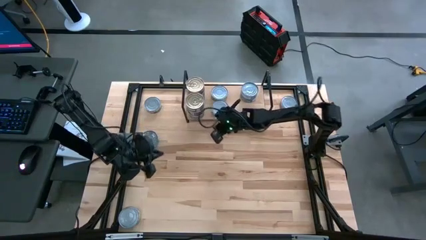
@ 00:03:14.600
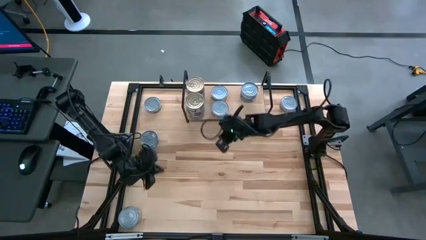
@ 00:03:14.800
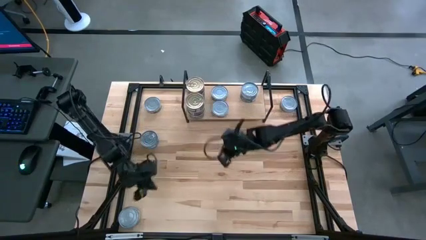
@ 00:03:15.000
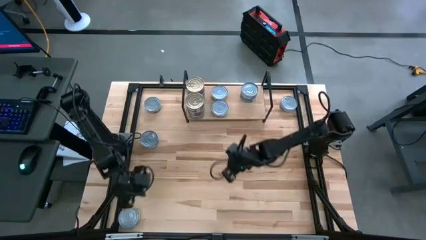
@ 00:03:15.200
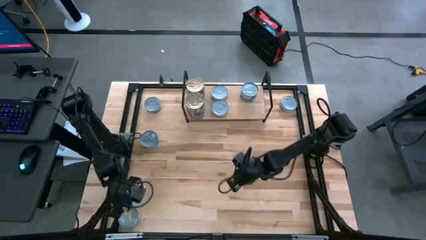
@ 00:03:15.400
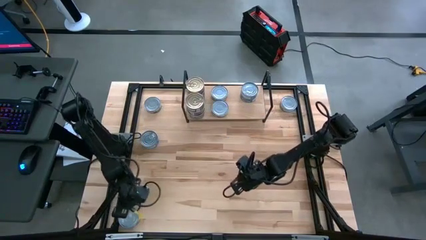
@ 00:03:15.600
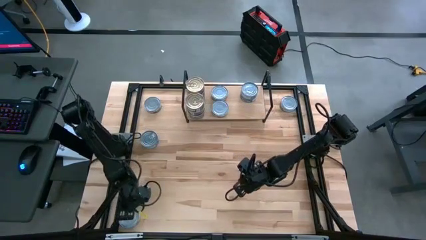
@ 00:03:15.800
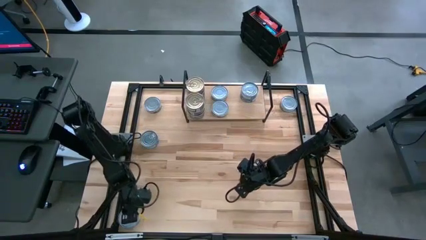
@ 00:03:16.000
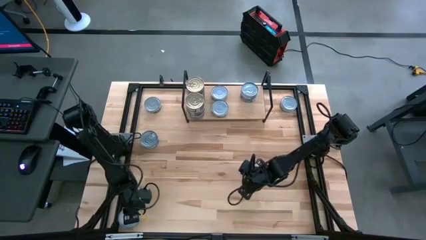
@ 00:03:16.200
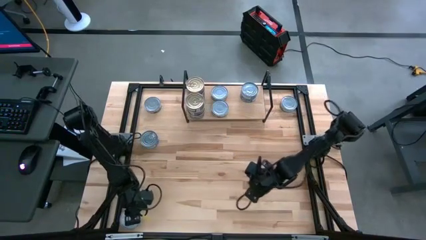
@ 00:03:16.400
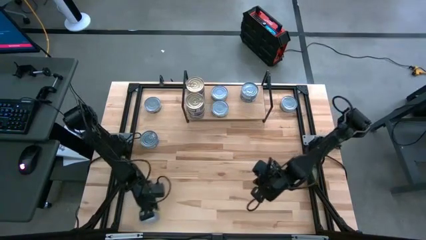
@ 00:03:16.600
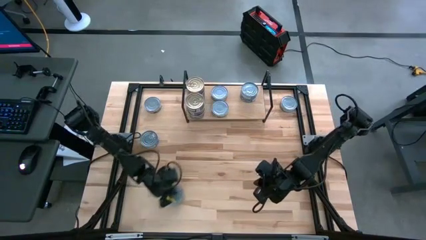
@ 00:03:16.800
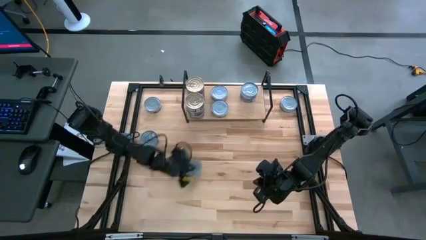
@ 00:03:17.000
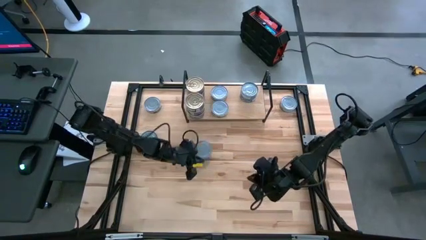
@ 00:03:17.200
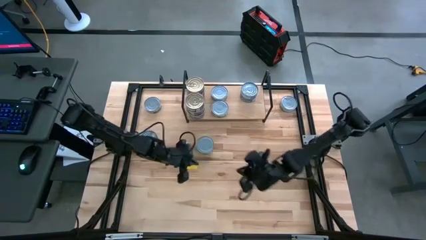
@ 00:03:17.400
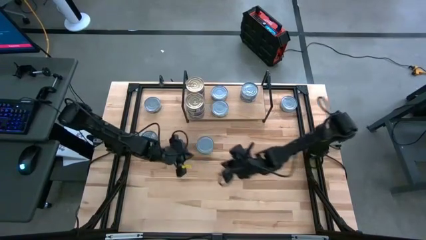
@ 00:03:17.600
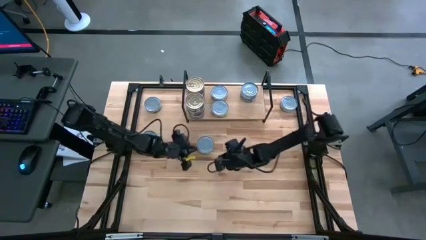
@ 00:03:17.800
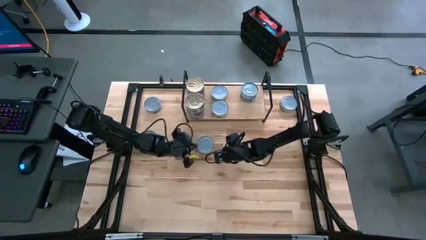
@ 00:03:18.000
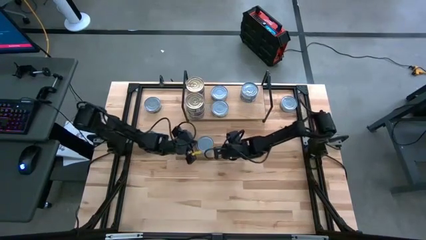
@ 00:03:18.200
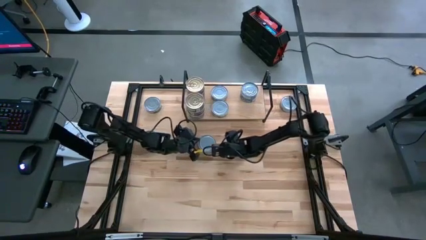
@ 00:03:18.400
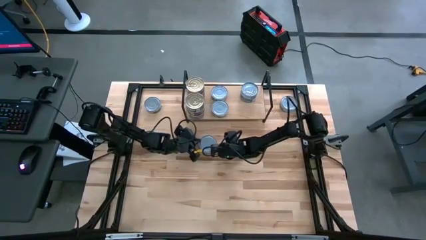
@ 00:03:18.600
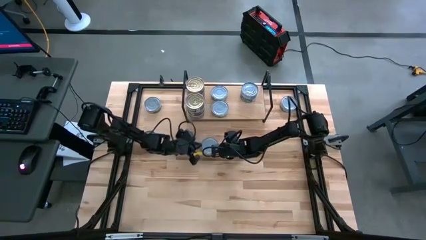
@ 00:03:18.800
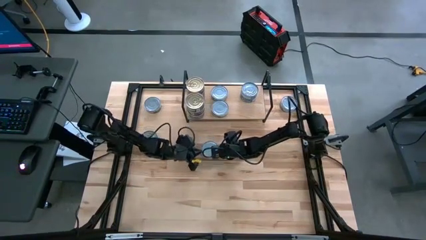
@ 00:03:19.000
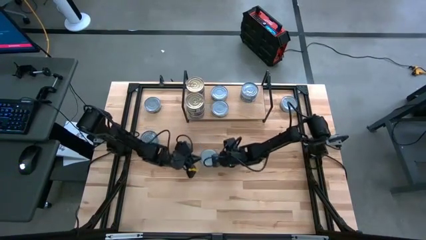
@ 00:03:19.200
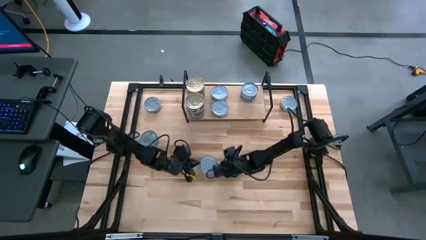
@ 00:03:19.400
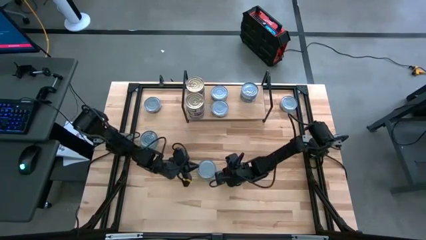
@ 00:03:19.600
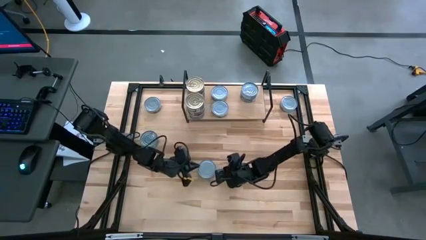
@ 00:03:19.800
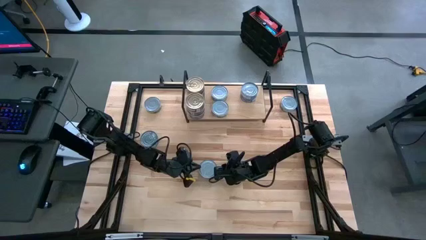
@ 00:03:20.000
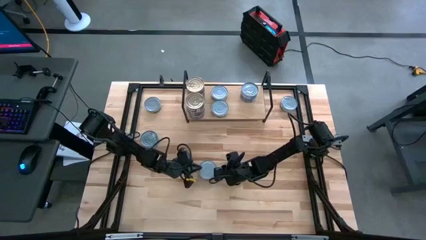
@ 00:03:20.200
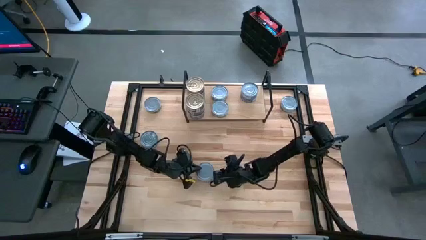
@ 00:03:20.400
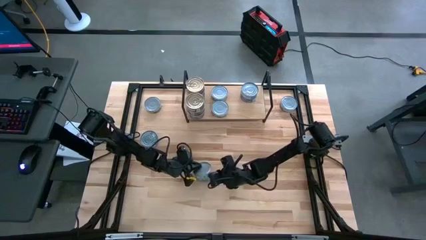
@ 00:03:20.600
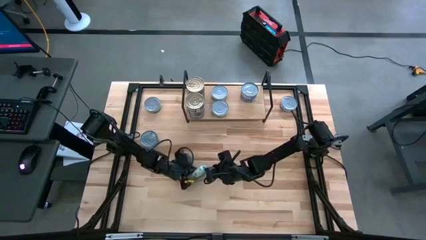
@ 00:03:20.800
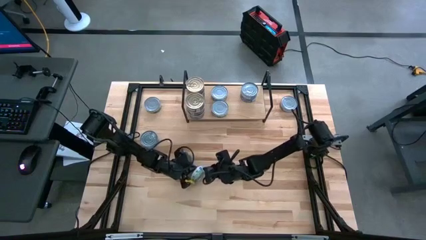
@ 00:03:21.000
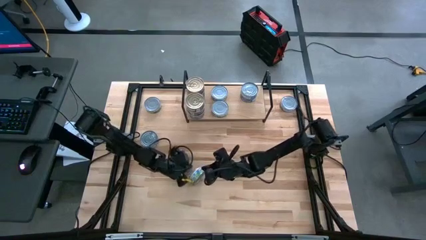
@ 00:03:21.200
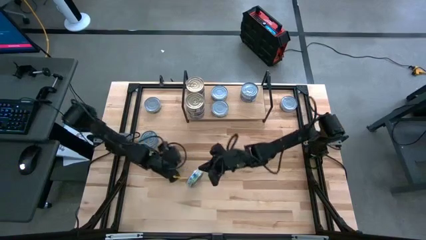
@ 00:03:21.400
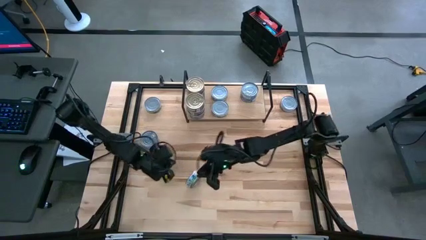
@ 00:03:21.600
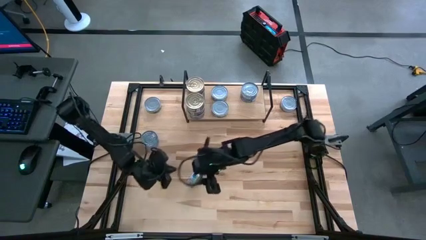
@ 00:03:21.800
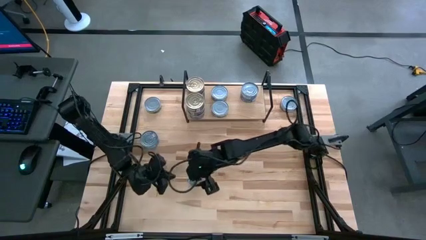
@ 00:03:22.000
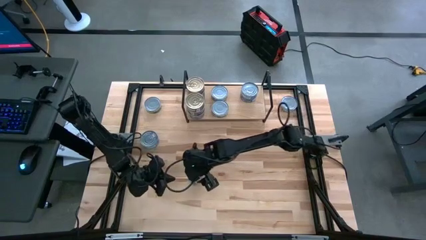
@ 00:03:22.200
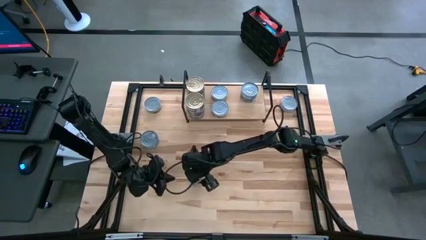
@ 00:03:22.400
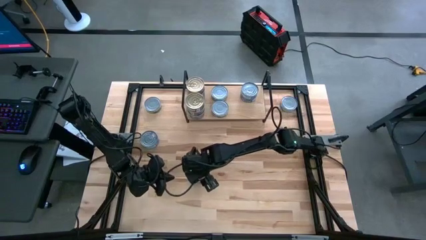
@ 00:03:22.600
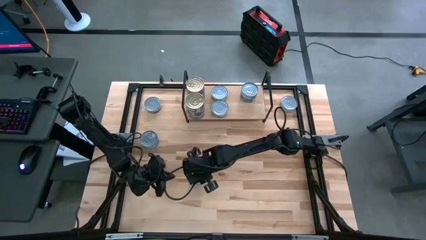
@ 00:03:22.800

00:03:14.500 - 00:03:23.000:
Task: Stack canned seafood by type on shelf
Stack the green white tuna can on top of the other green white tuna can on the shelf

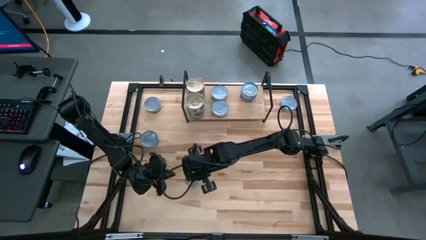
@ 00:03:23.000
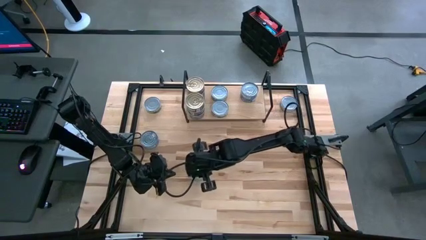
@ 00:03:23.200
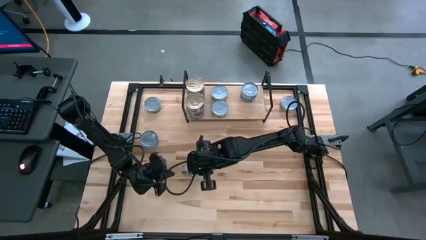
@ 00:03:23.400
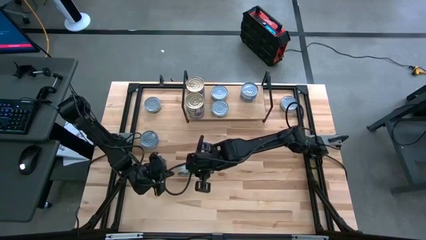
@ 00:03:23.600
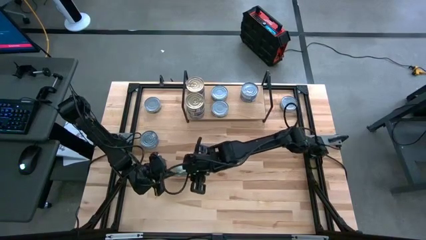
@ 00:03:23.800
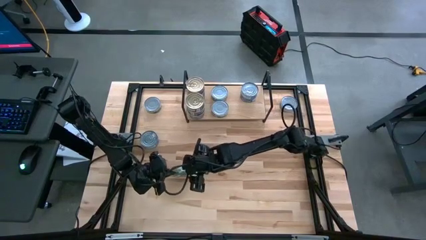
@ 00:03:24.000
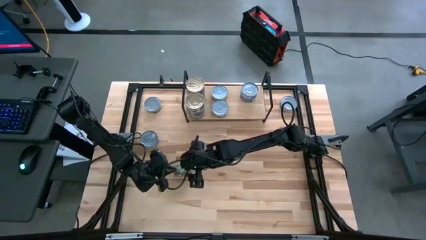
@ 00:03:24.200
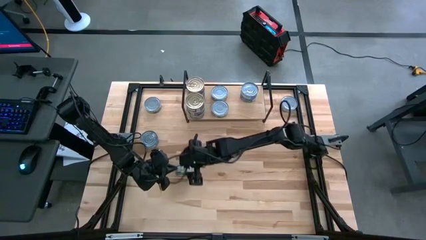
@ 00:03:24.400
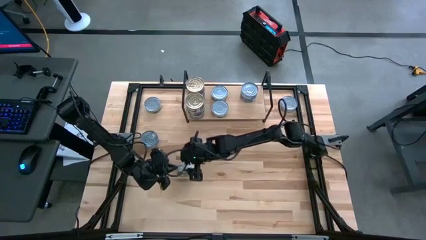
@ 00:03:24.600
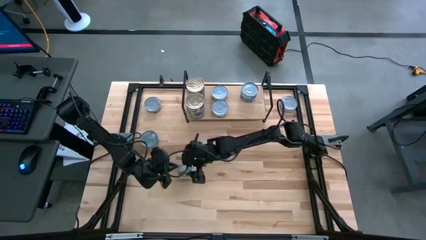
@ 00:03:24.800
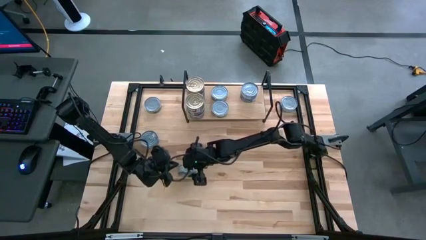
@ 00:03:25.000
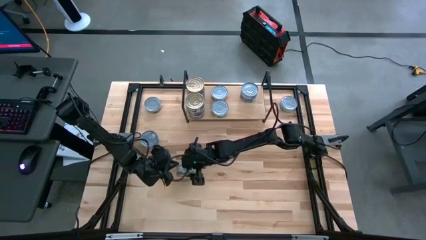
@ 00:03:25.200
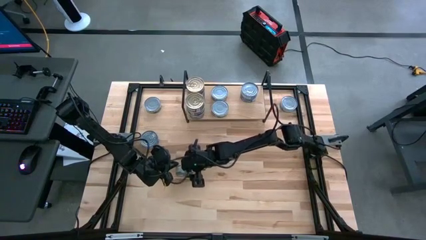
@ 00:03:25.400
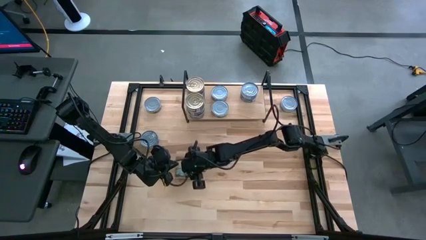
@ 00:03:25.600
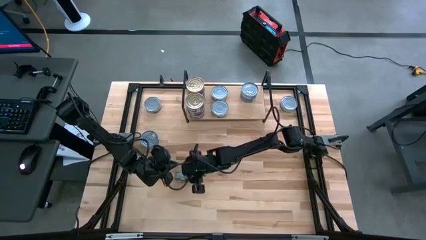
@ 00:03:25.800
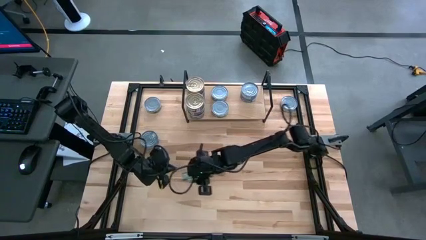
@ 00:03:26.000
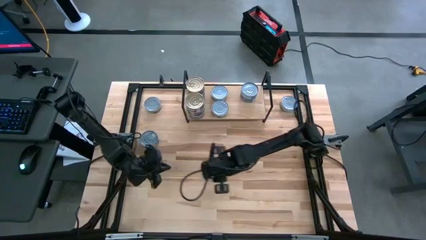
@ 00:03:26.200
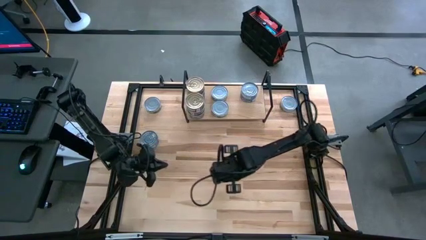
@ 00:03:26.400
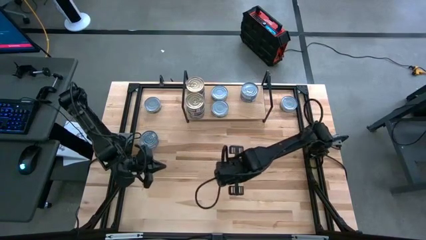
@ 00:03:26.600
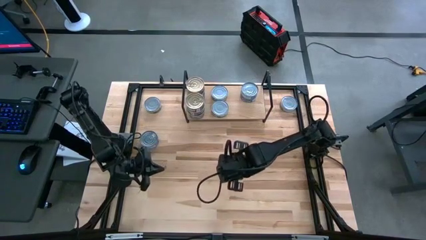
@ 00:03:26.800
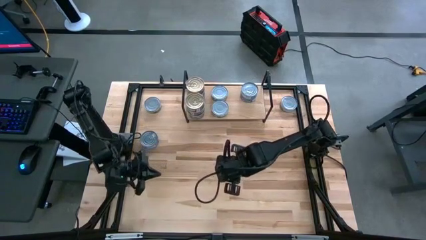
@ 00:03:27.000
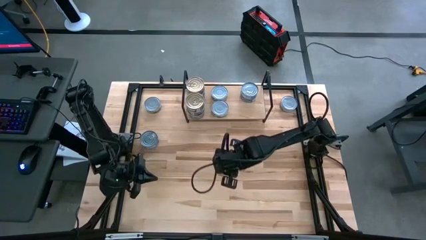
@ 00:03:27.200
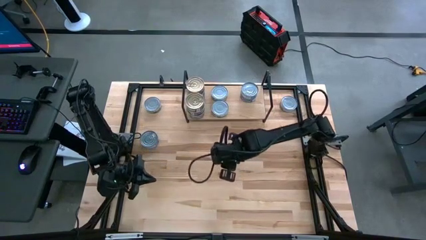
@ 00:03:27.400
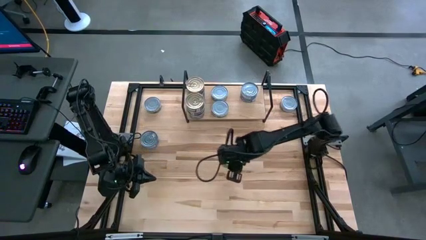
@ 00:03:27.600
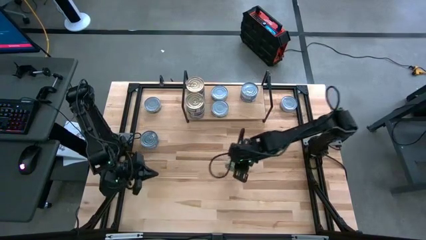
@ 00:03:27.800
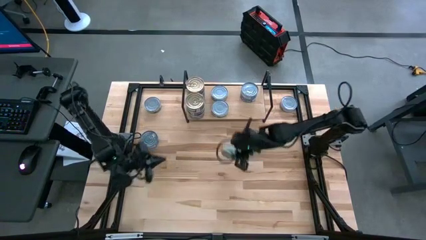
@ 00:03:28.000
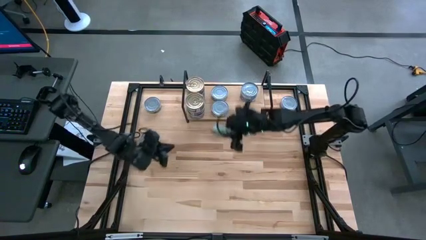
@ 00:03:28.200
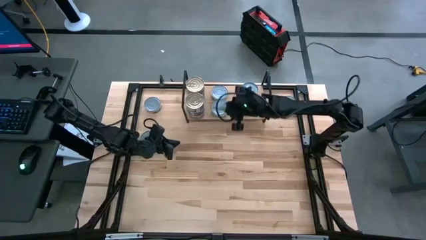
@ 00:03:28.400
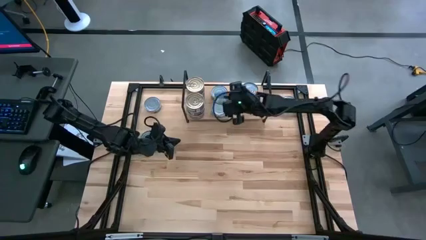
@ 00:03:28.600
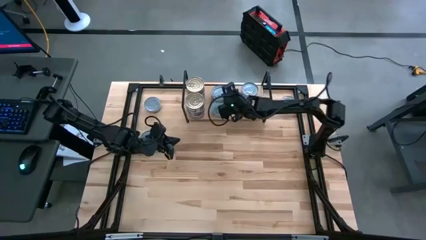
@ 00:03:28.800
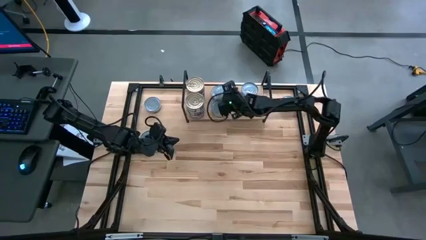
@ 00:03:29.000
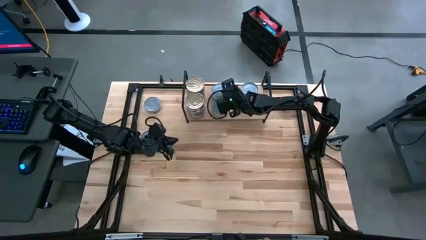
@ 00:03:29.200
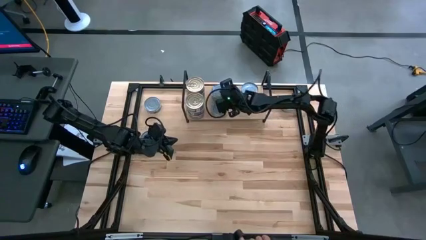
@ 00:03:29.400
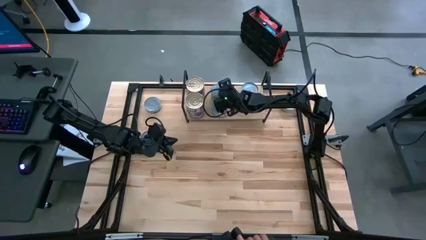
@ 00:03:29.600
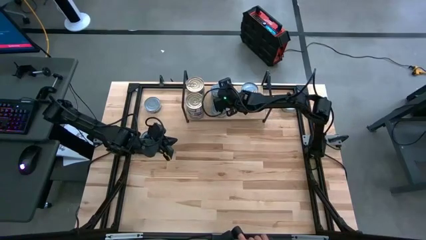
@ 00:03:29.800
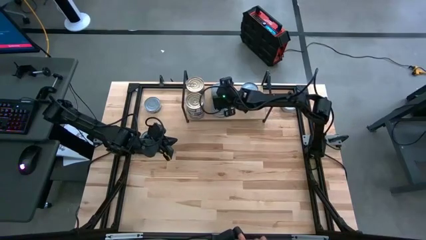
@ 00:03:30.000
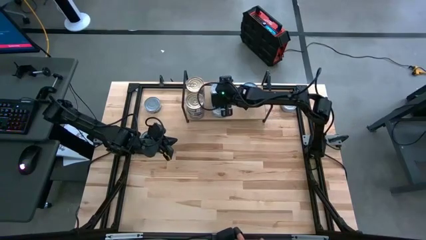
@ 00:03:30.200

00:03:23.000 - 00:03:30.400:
Stack the green white tuna can on top of the other green white tuna can on the shelf

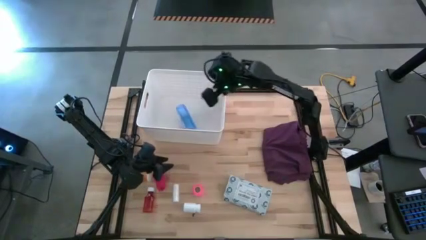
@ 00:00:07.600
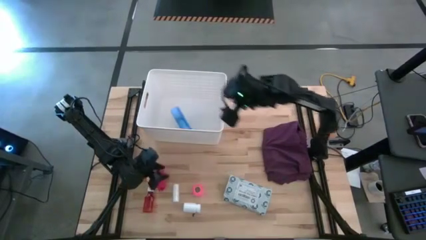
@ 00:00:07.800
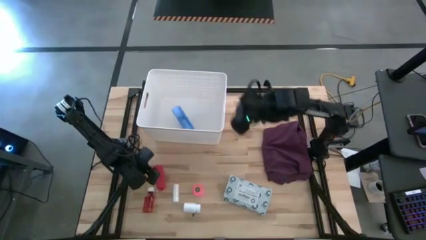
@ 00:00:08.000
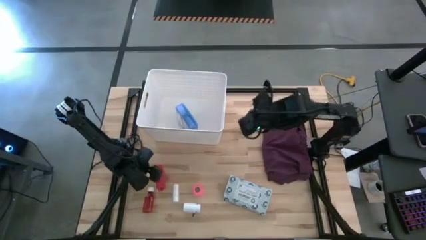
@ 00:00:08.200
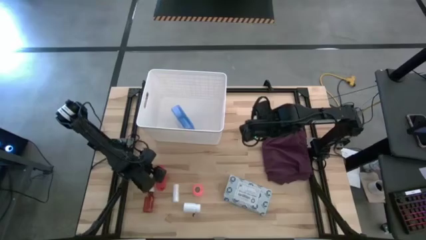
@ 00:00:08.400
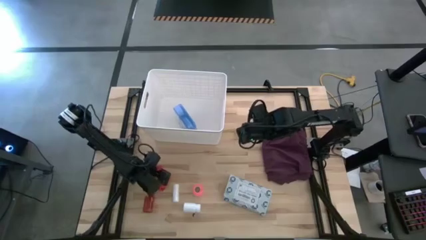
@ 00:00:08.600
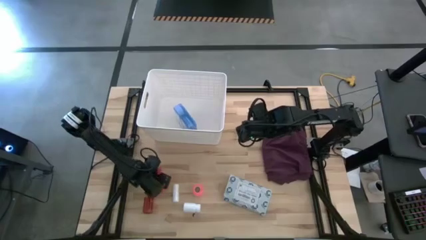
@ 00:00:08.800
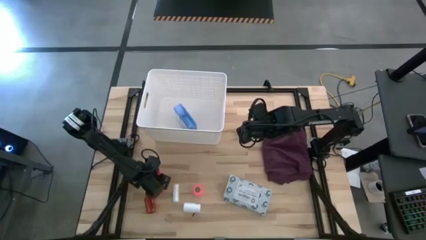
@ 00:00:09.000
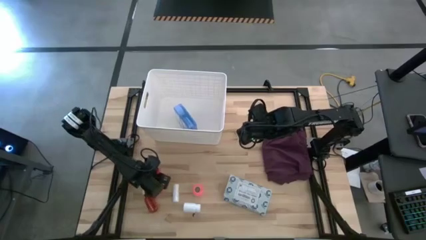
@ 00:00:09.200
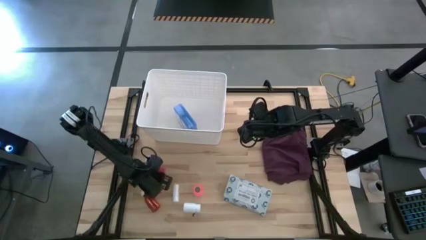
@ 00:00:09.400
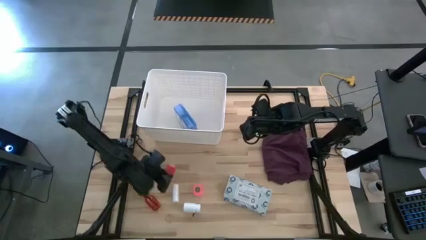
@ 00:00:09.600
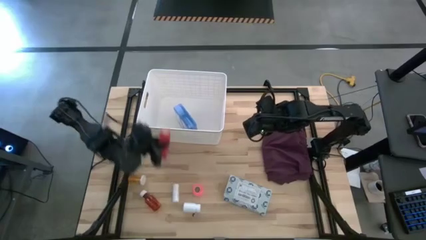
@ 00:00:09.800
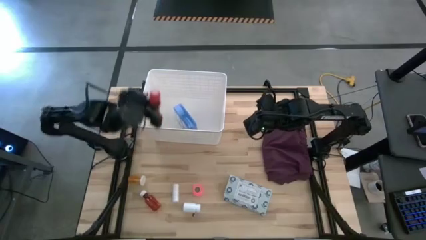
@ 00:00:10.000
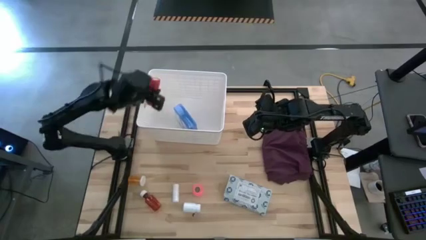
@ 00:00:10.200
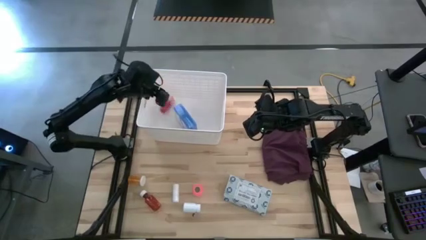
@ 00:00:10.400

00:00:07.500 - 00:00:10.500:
Task: Pick & place medical supplies in basket/bin
Put the red bandage into the white bin
